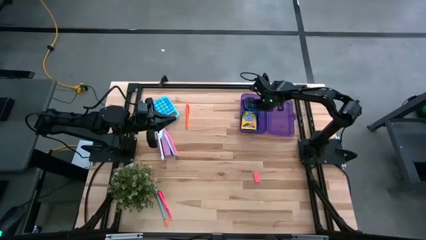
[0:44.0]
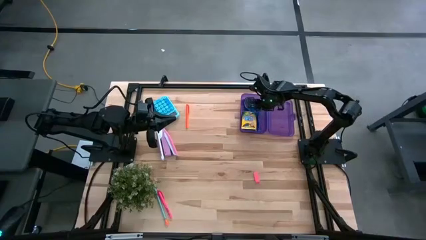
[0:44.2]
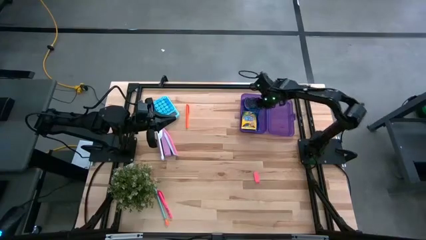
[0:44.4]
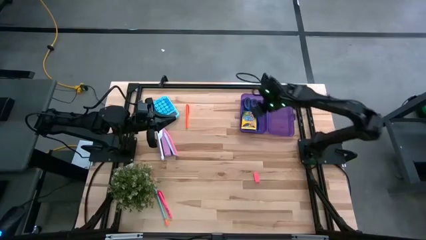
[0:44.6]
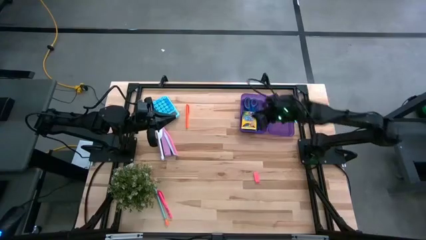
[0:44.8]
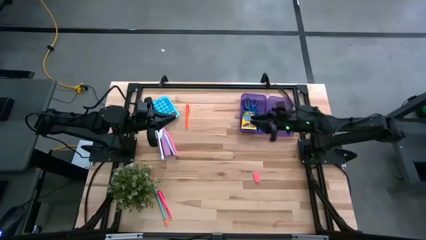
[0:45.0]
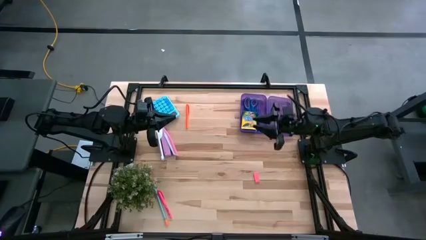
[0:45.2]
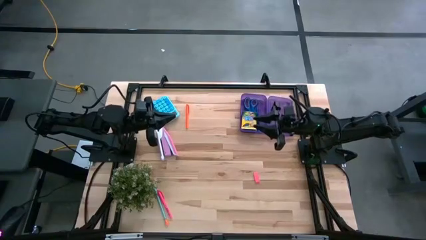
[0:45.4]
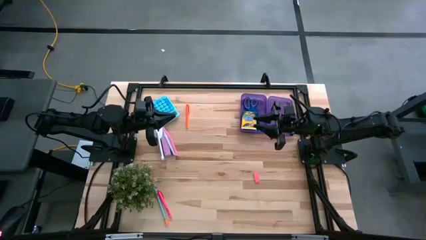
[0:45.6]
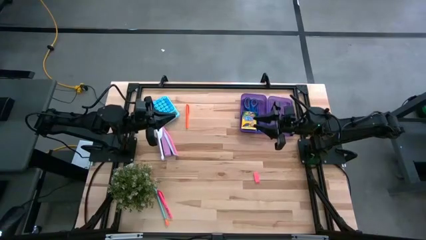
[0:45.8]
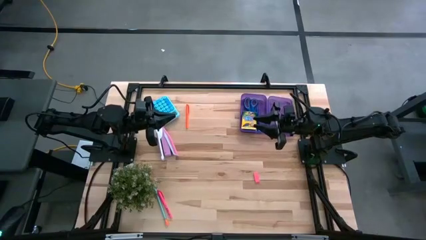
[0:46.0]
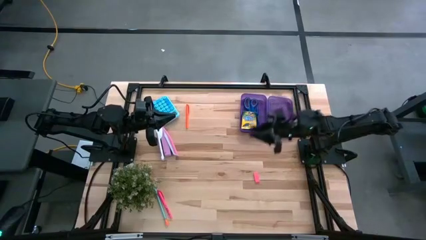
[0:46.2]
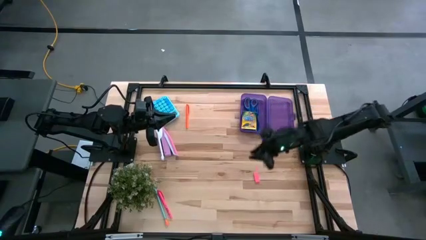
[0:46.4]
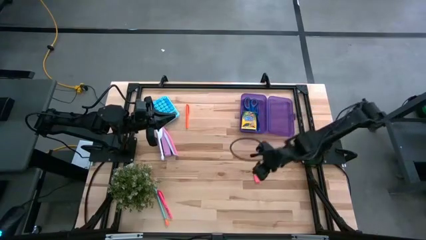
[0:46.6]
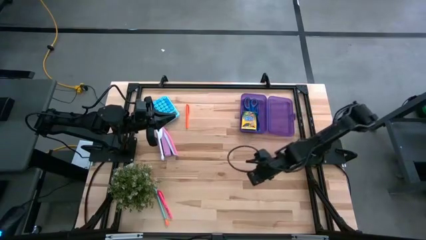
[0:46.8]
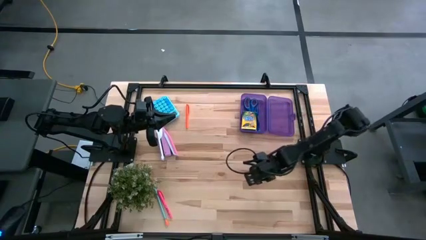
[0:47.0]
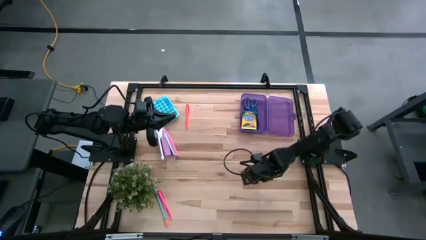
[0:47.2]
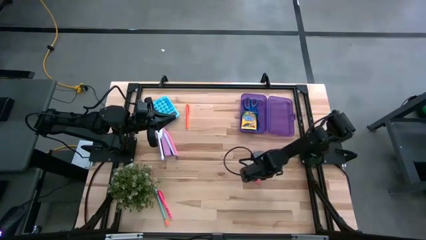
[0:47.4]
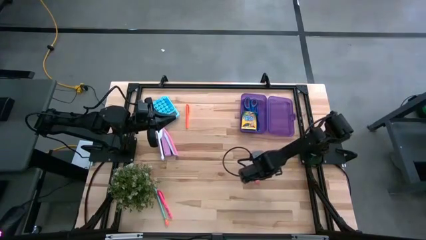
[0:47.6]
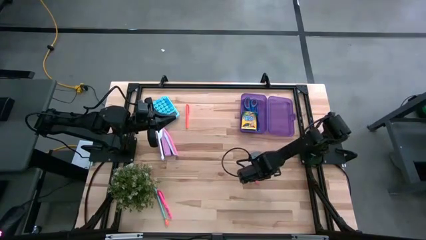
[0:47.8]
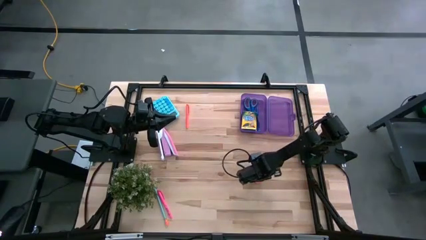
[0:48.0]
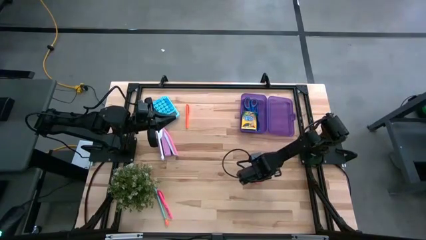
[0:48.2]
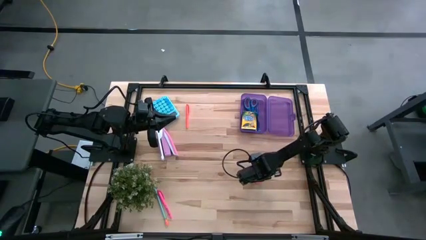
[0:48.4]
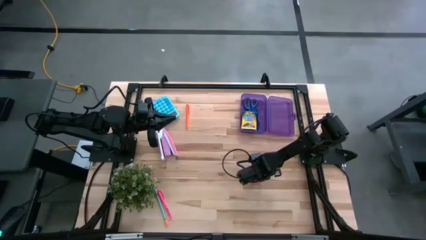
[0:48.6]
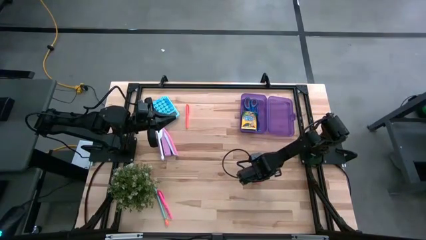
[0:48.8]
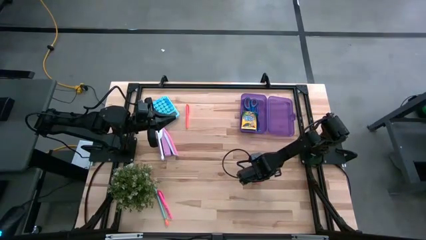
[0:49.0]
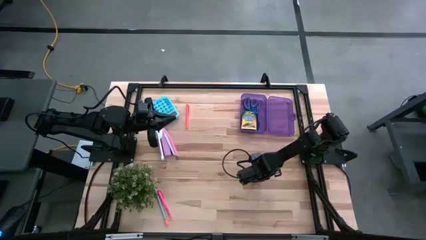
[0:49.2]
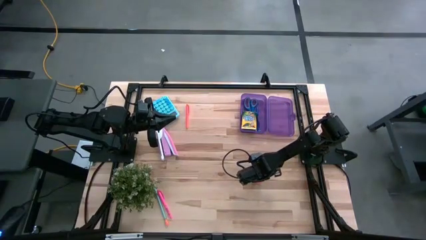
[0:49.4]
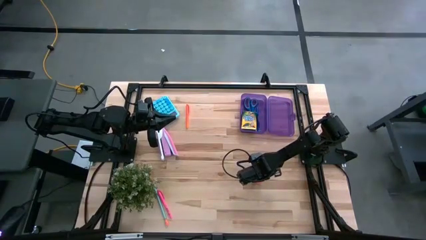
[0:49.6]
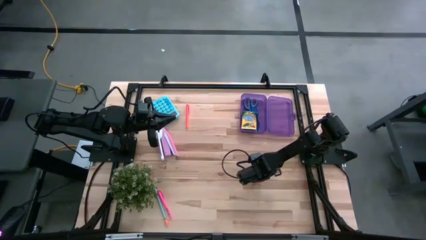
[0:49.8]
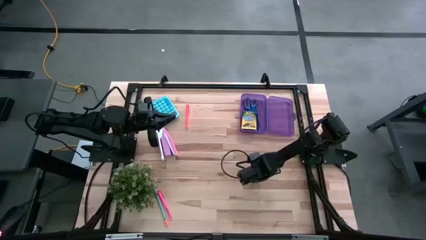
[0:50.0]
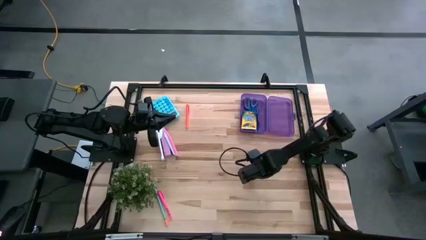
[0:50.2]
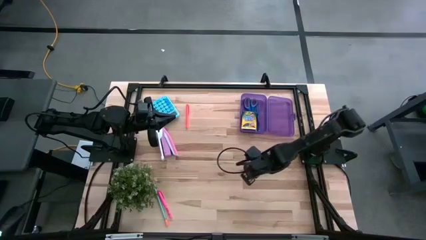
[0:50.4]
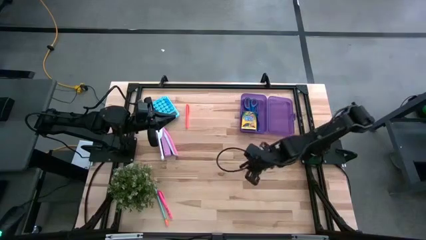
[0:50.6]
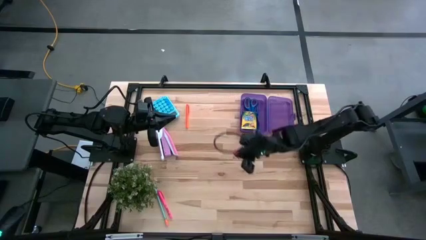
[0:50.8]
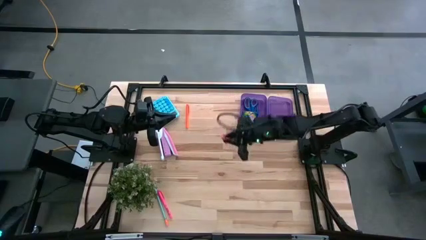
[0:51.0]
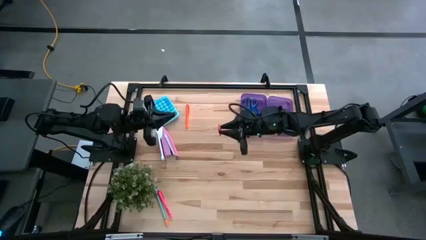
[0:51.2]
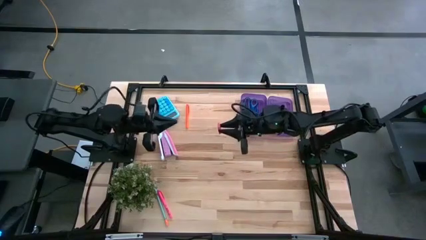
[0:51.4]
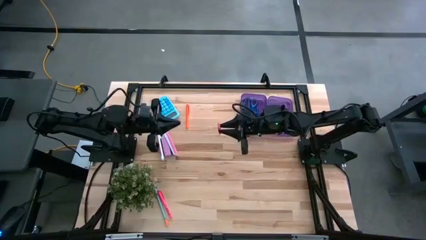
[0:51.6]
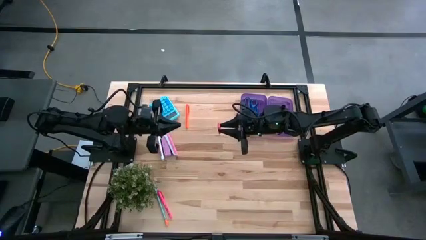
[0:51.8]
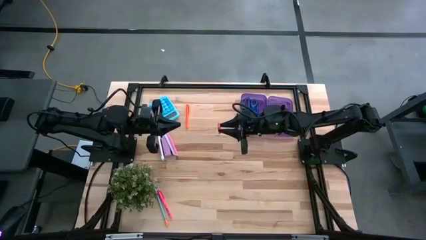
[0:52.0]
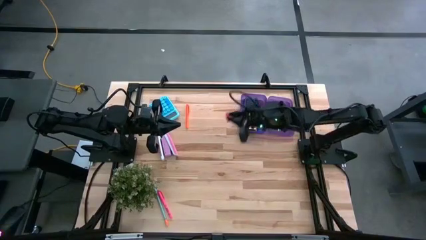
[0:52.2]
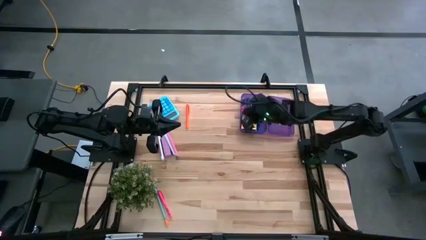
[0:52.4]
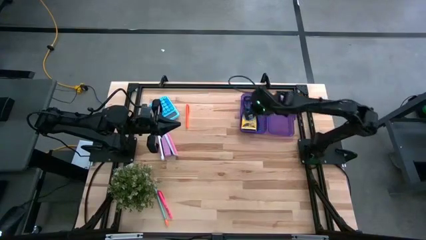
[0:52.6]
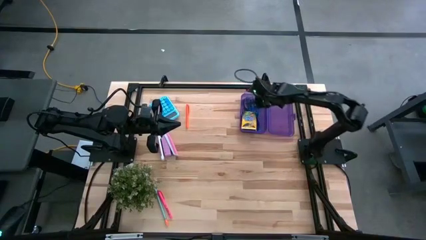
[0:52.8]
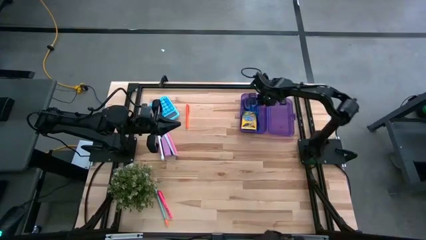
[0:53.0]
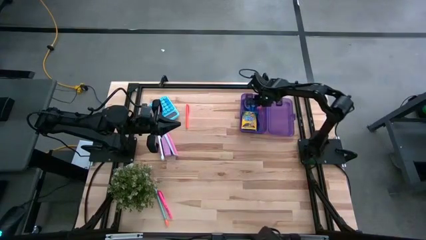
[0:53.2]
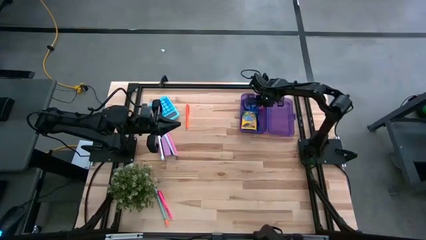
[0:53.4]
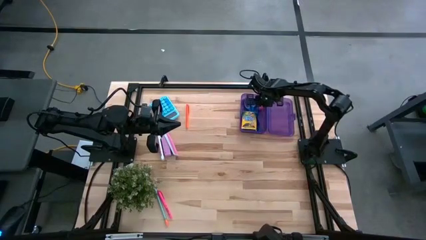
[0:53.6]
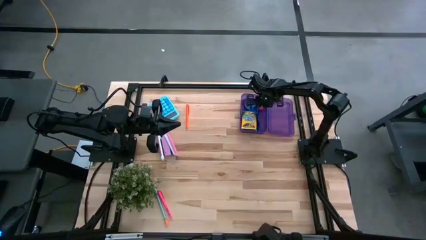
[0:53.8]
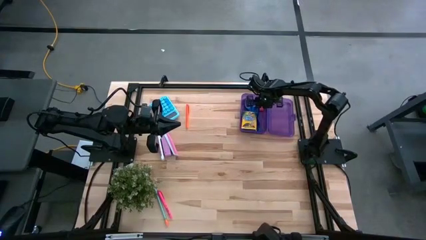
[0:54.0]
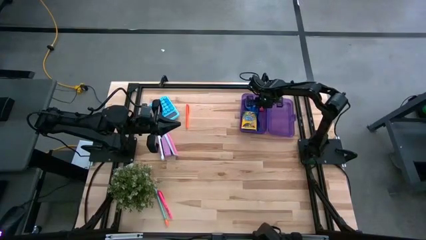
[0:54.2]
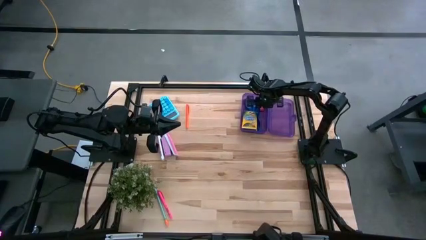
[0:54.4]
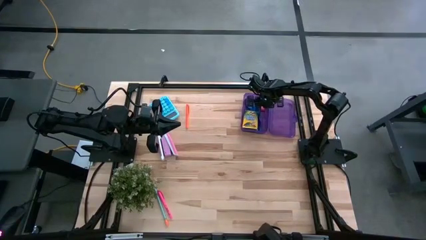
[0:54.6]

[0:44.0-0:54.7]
Task: Pack school essentials
Put the pink pencil eraser into the violet supply box

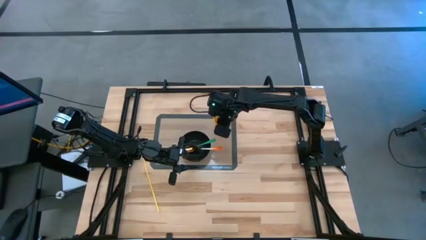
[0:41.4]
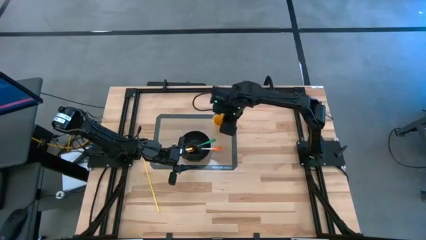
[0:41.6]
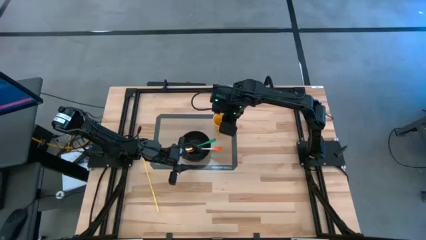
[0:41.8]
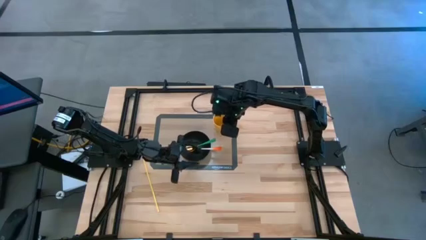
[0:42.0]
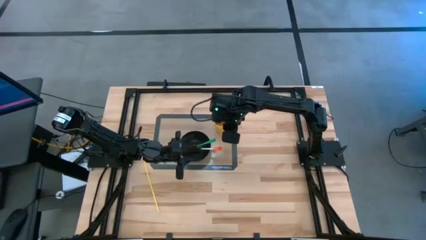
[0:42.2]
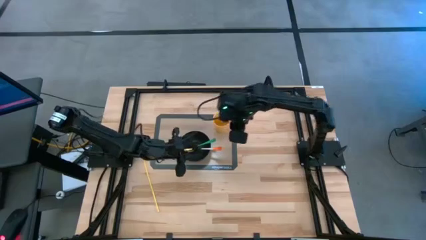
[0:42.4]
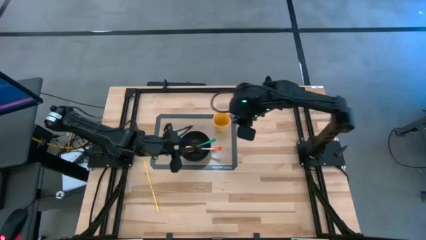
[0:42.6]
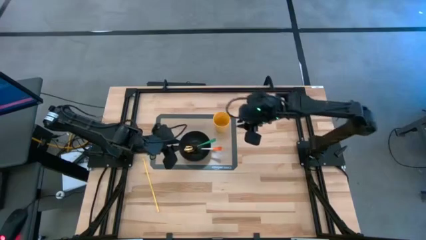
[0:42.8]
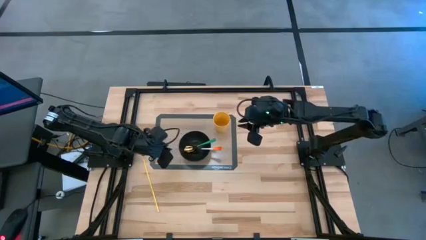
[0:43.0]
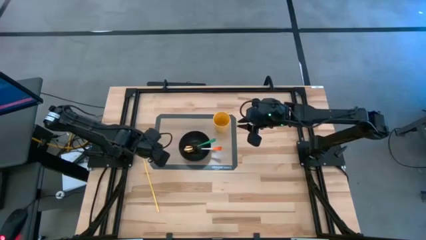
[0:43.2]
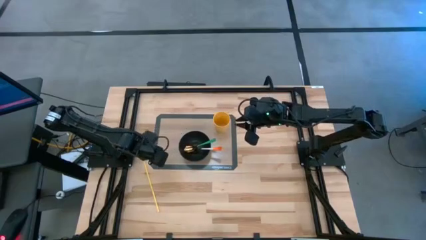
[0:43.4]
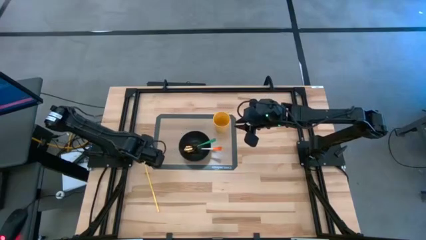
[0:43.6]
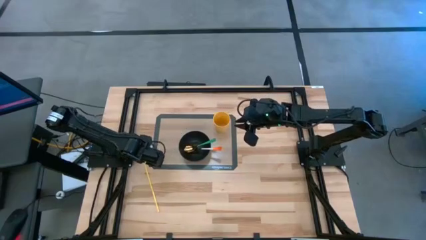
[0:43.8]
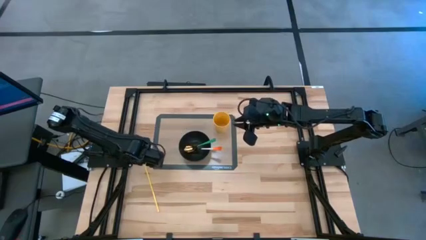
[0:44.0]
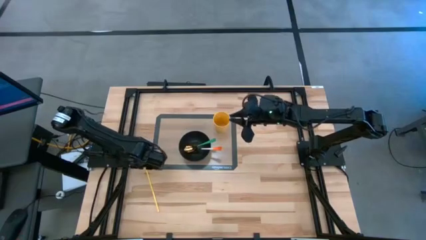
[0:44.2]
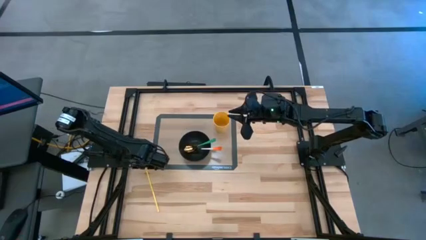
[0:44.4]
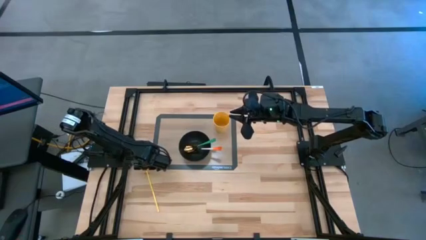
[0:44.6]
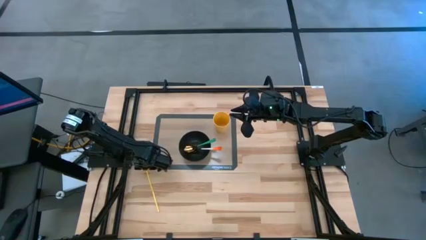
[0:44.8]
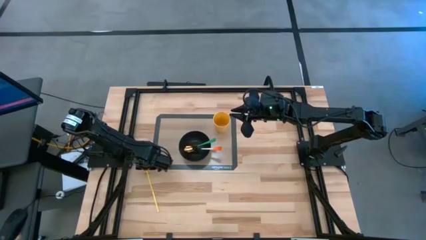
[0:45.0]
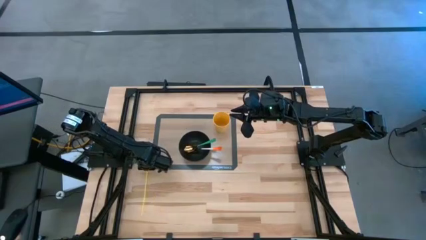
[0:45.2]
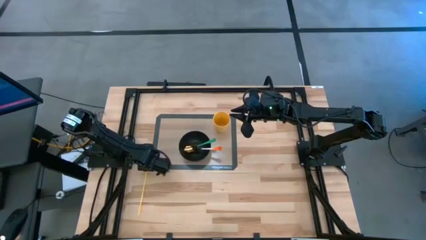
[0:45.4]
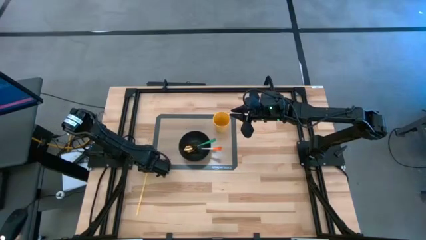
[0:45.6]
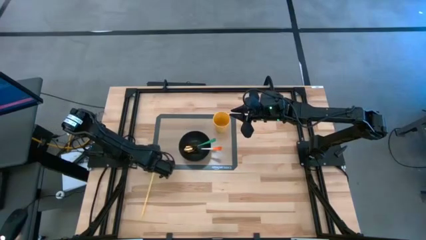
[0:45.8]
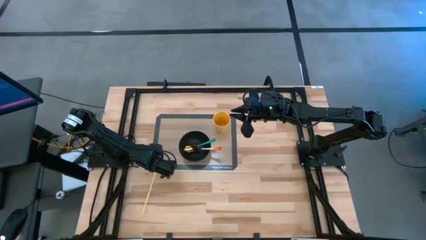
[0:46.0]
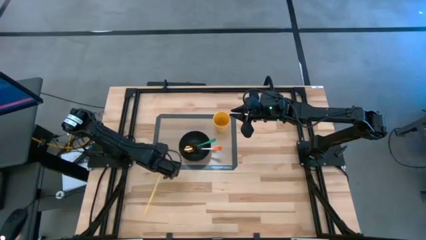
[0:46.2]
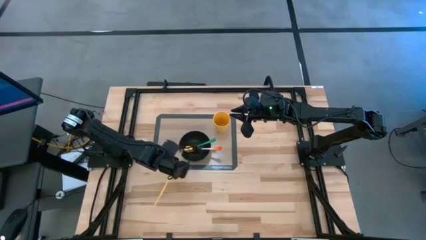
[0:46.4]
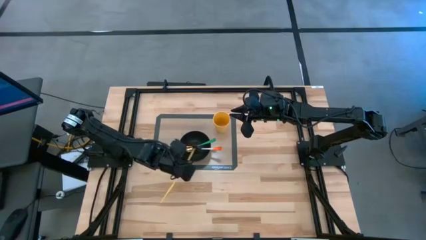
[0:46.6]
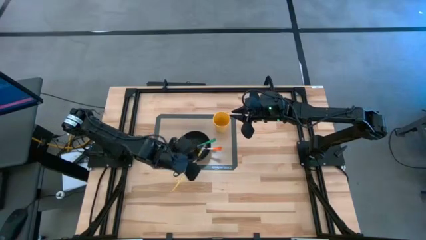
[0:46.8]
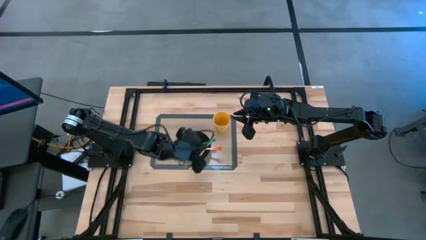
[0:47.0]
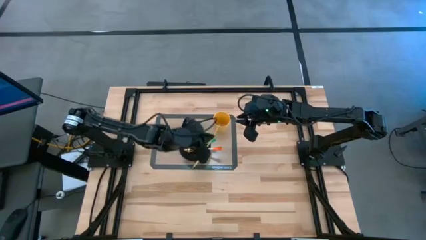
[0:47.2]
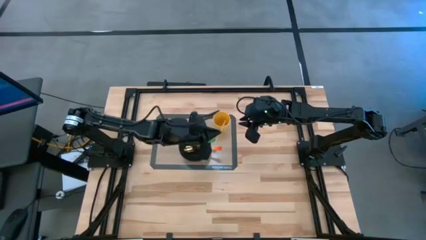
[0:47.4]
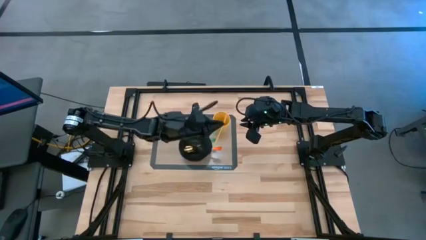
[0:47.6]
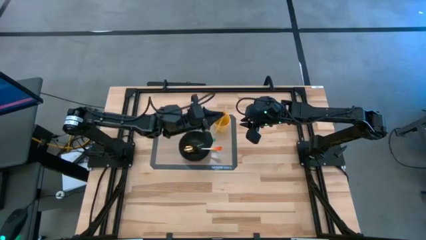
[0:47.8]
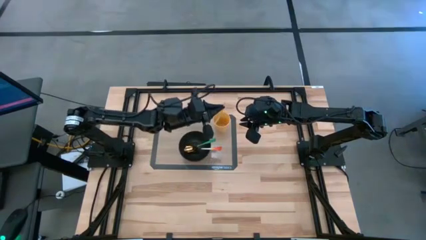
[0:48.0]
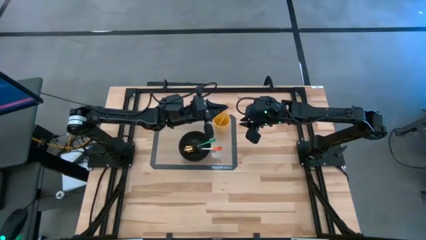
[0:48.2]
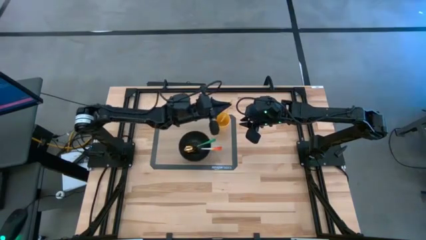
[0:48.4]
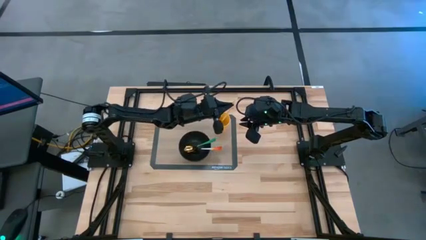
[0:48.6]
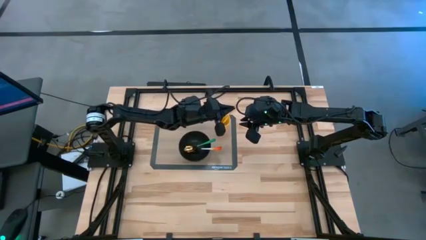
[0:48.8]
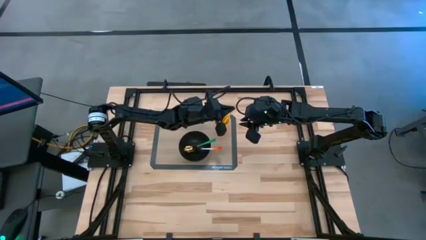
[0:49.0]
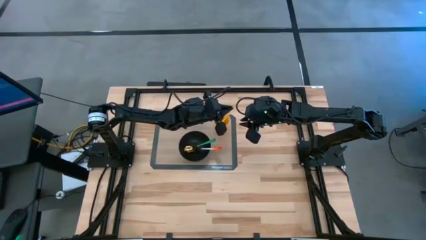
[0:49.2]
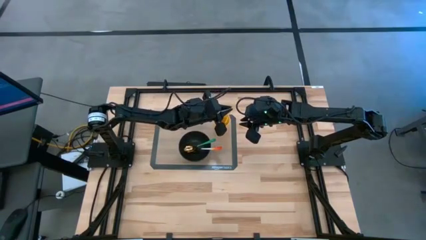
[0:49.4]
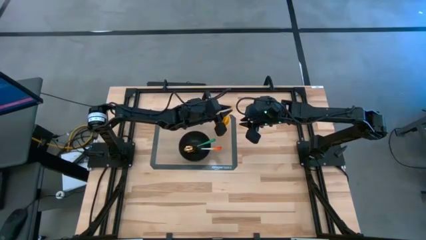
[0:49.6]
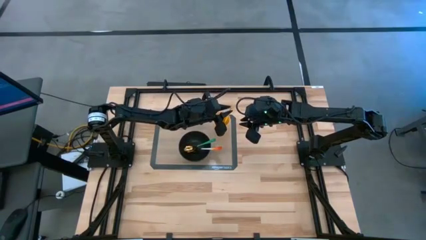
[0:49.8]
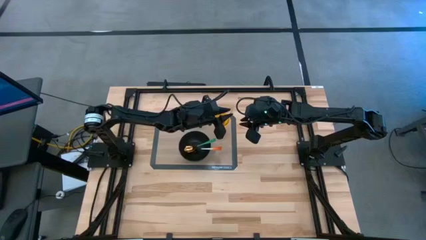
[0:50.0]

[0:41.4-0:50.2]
Task: Pick & Place Utensil
Put the yellow straw into the yellow cup on the transparent mat
